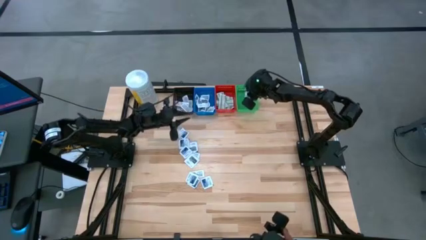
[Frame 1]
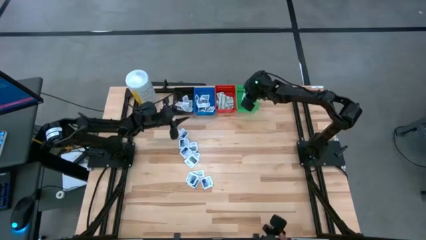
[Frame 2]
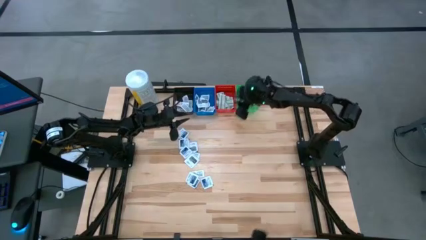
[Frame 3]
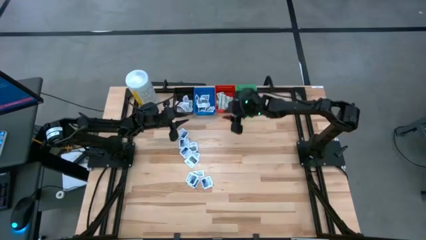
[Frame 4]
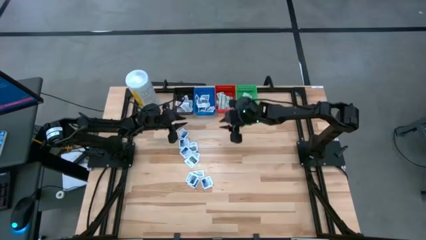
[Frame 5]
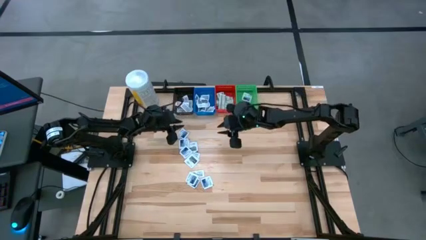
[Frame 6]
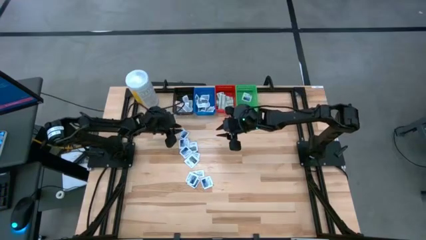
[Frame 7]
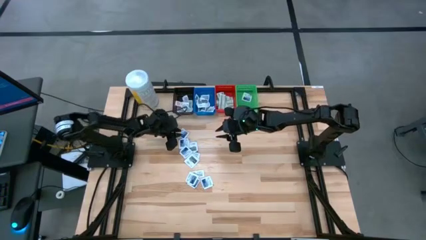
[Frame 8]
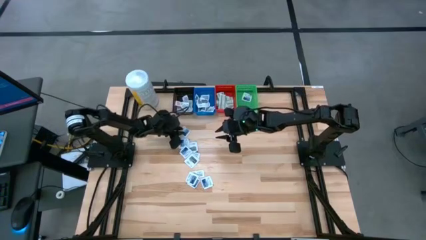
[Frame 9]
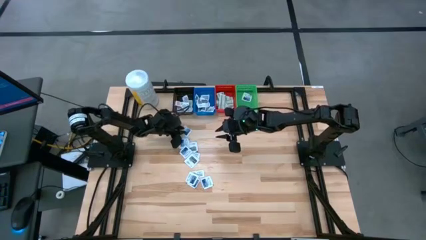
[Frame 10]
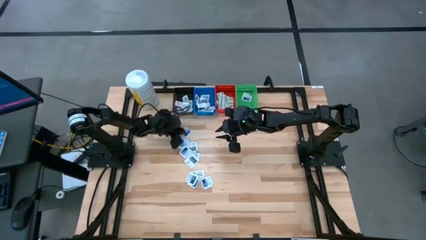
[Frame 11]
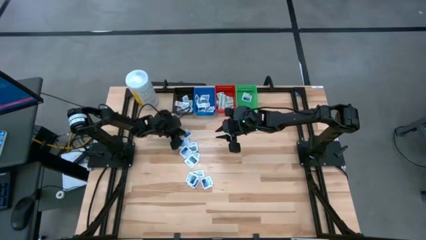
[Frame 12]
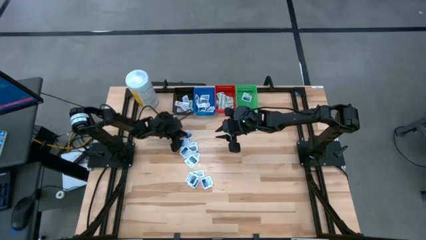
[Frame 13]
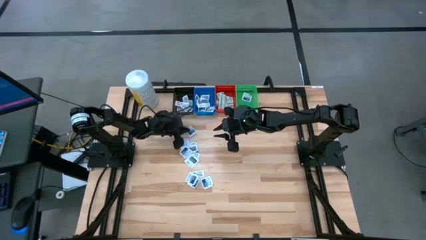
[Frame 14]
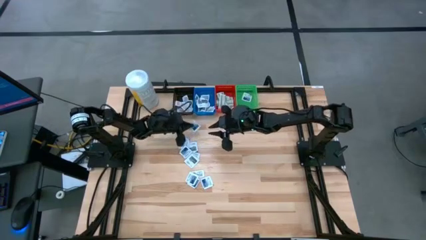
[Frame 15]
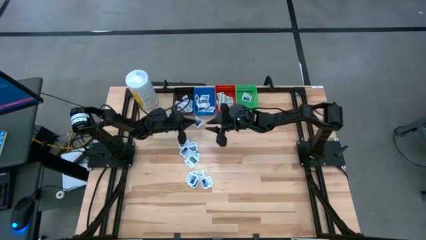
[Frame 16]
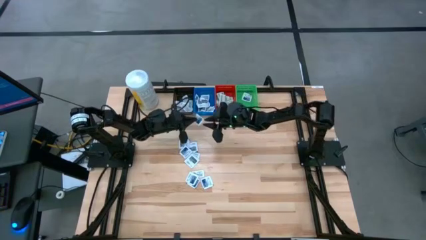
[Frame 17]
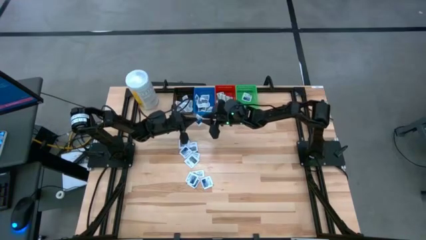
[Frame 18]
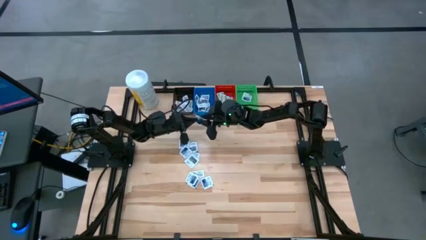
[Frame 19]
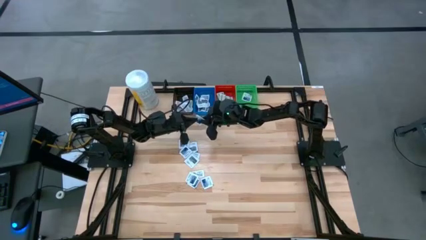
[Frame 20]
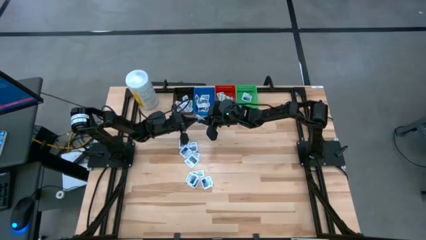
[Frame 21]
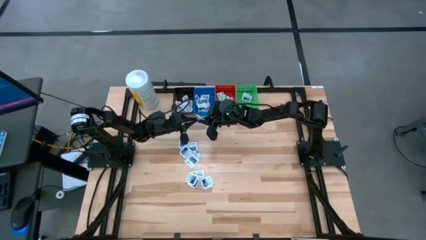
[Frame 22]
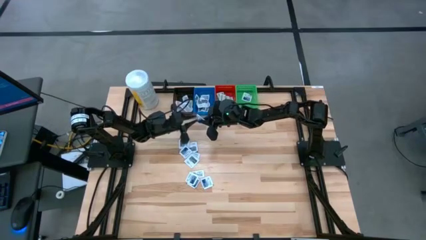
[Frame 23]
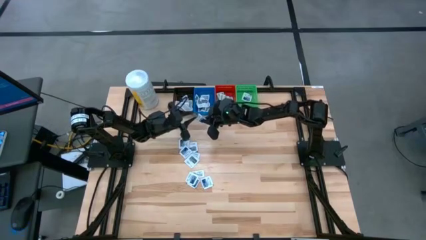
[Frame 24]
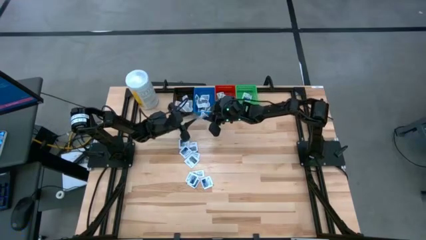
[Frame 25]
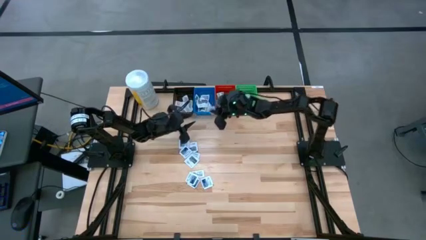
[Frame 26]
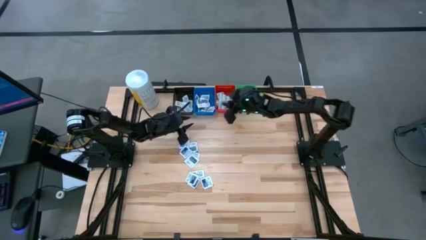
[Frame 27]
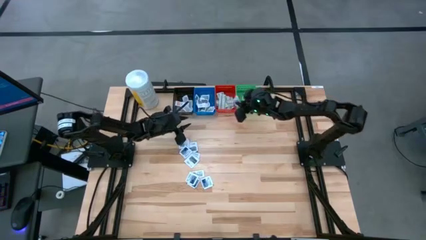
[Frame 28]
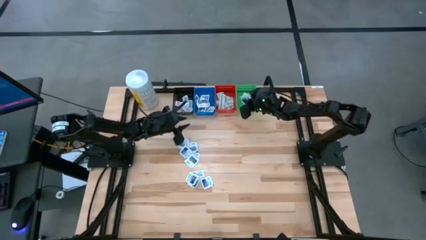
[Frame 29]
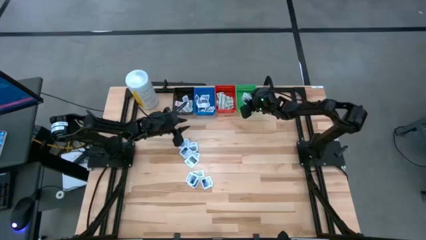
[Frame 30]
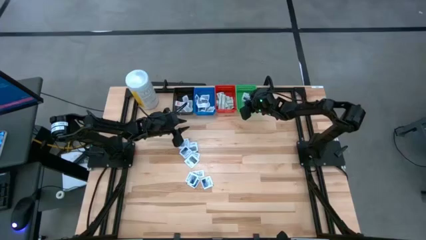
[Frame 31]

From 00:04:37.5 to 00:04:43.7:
Task: Pick & Place First Aid Supplies
Put the blue alcohol pad into the green bin

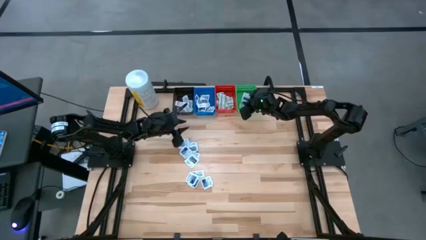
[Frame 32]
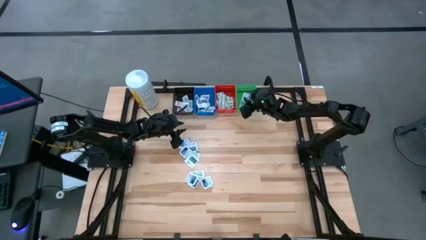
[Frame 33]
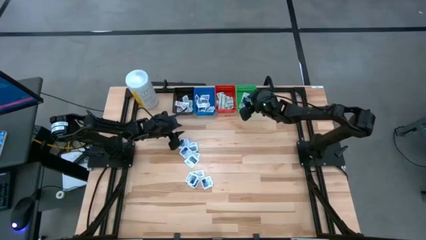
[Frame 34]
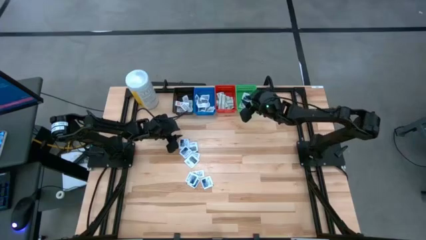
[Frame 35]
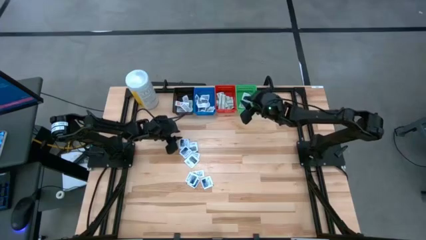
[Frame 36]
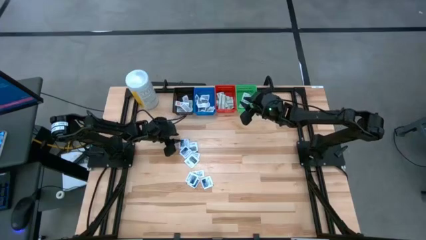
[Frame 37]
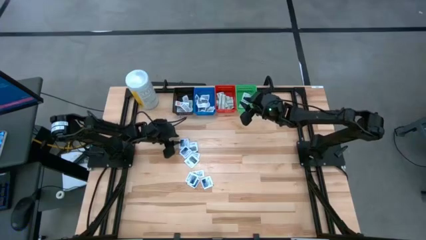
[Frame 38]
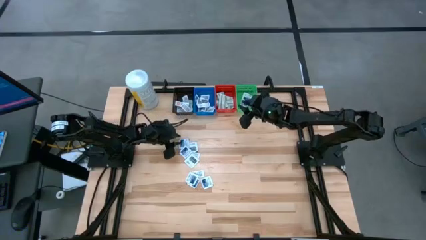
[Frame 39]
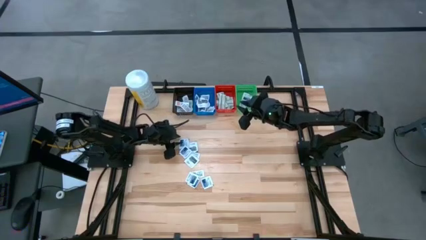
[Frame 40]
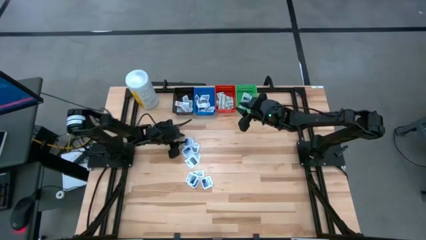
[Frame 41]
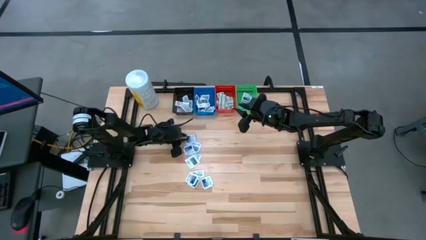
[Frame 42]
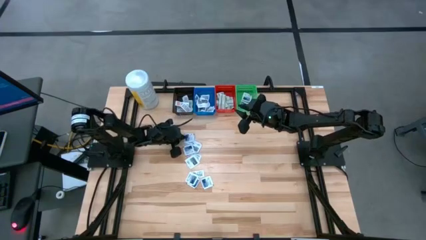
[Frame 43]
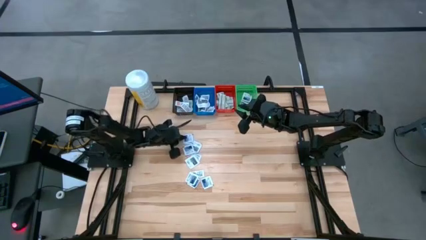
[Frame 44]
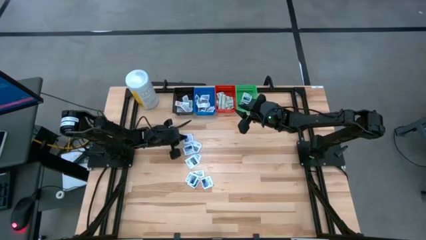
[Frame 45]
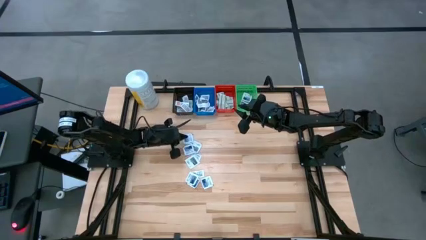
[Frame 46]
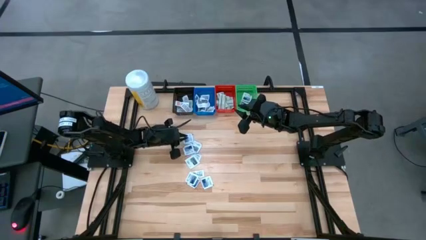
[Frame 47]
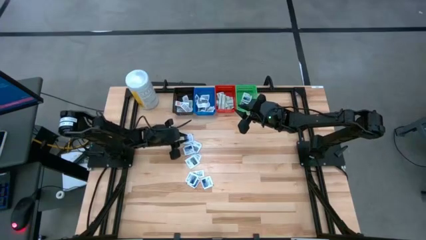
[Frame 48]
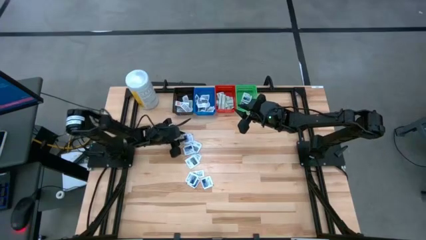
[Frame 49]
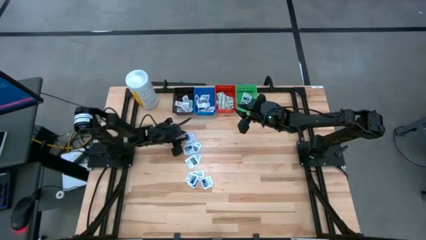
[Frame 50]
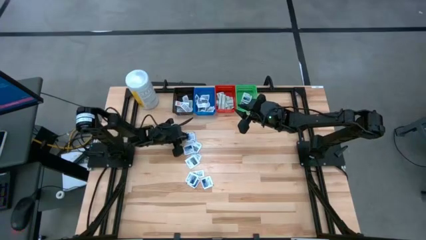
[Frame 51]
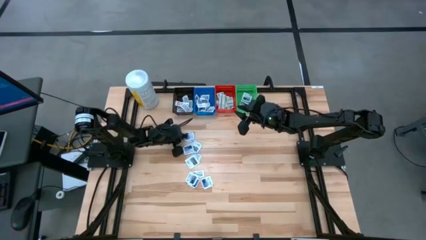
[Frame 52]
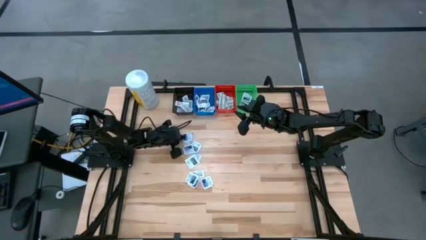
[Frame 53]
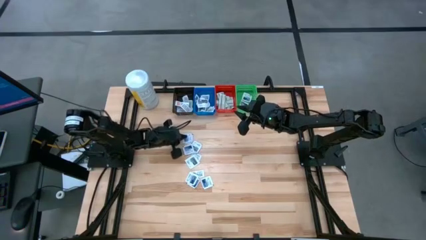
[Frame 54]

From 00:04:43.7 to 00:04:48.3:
Put the blue alcohol pad into the green bin

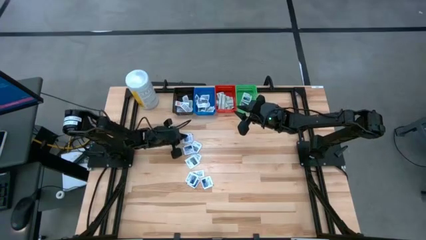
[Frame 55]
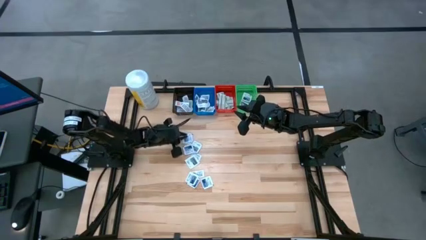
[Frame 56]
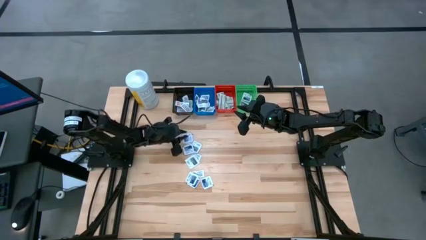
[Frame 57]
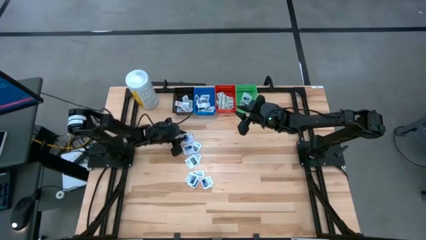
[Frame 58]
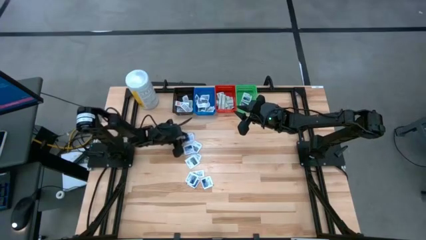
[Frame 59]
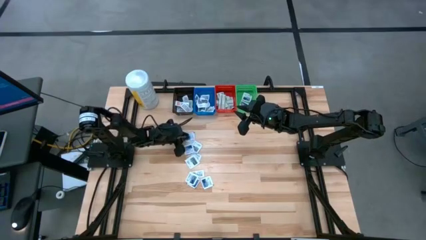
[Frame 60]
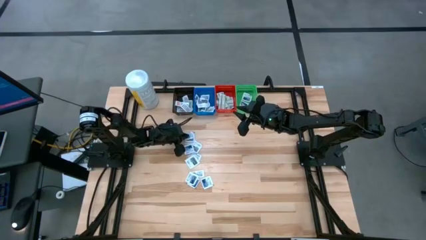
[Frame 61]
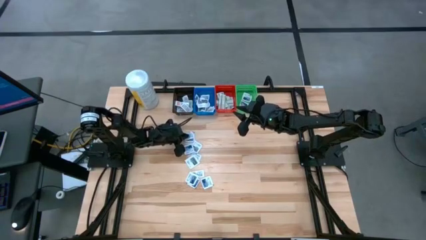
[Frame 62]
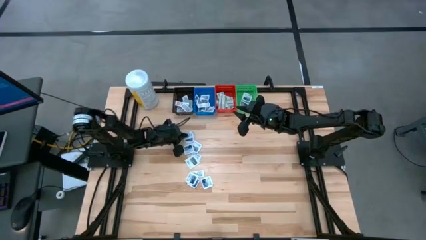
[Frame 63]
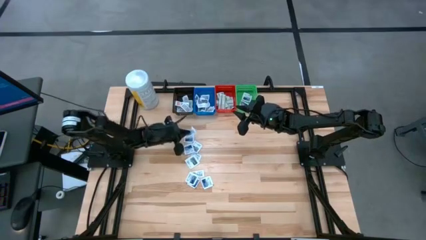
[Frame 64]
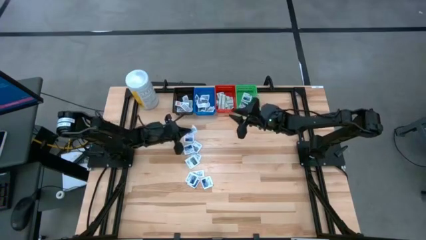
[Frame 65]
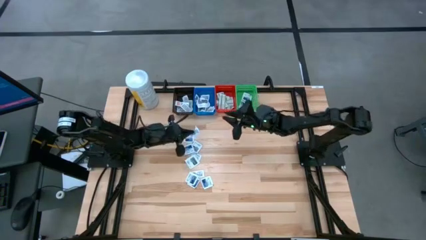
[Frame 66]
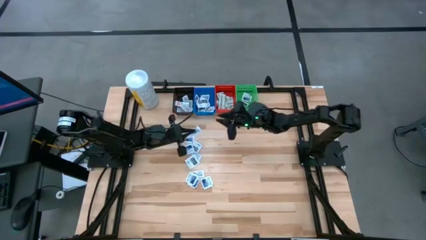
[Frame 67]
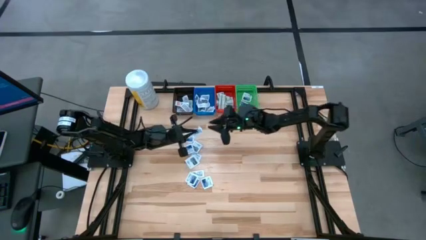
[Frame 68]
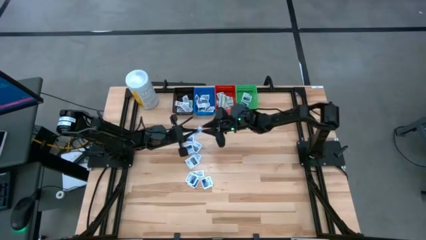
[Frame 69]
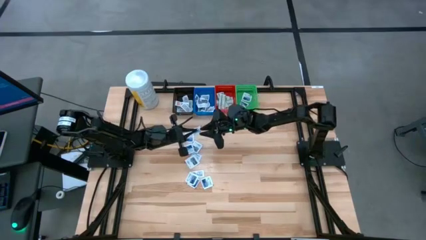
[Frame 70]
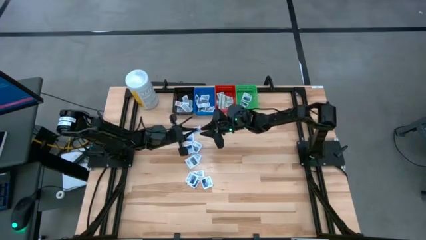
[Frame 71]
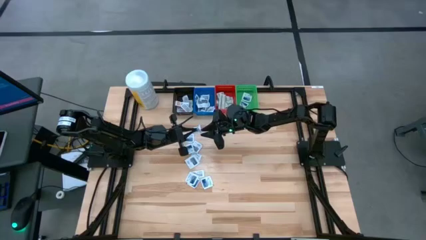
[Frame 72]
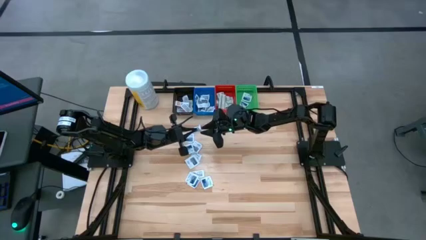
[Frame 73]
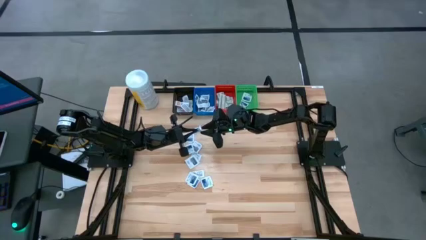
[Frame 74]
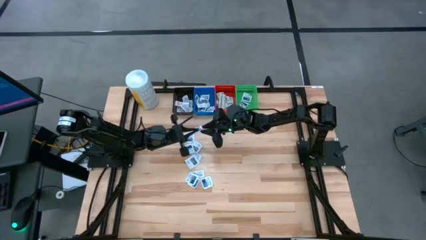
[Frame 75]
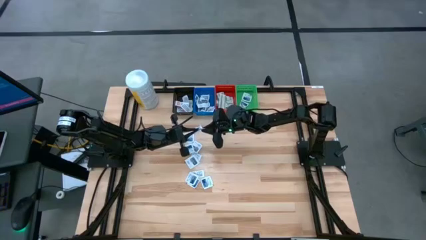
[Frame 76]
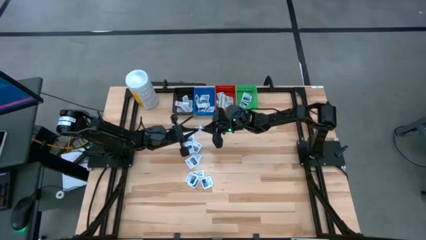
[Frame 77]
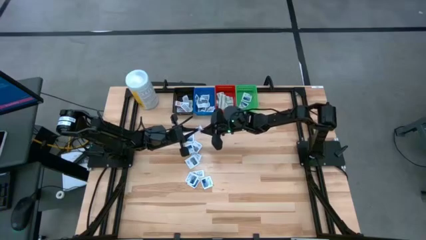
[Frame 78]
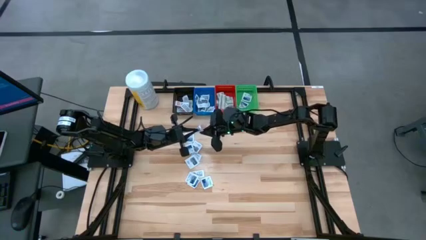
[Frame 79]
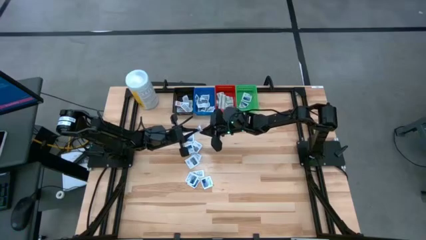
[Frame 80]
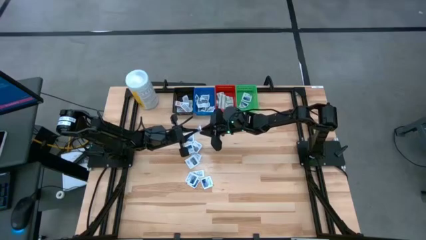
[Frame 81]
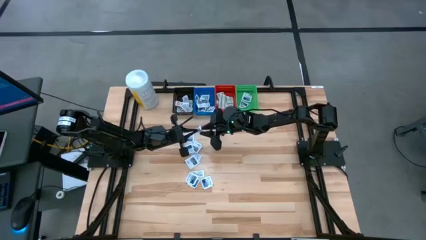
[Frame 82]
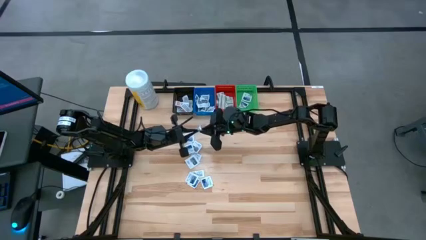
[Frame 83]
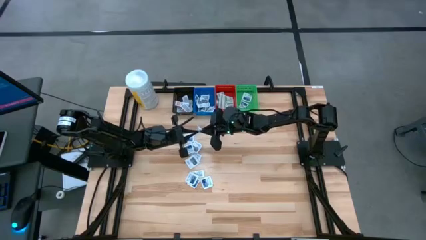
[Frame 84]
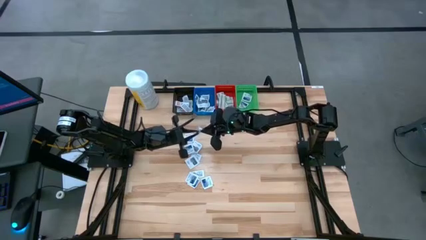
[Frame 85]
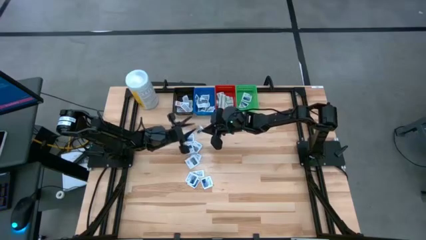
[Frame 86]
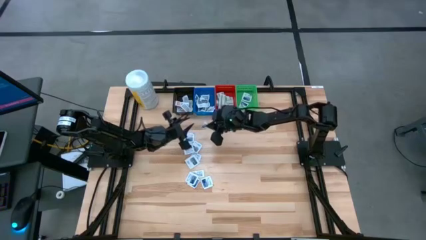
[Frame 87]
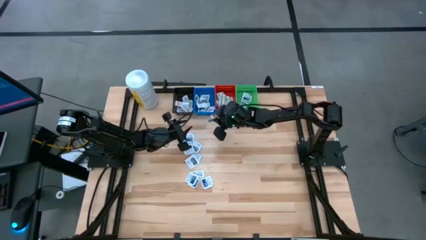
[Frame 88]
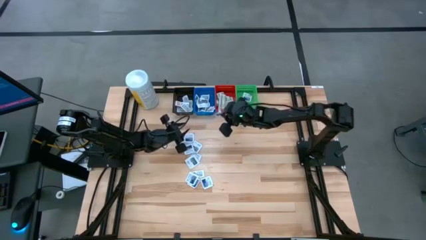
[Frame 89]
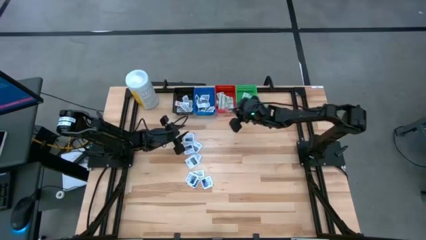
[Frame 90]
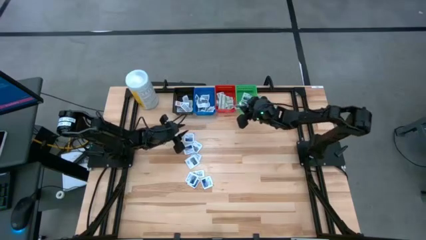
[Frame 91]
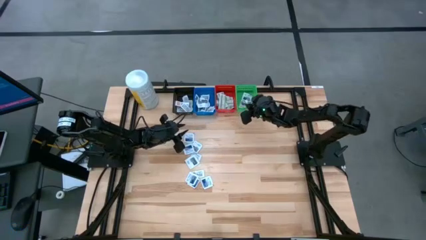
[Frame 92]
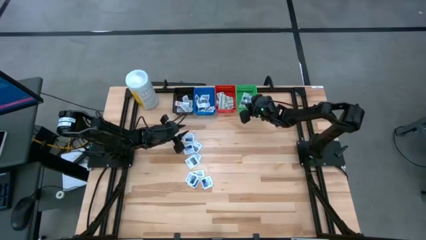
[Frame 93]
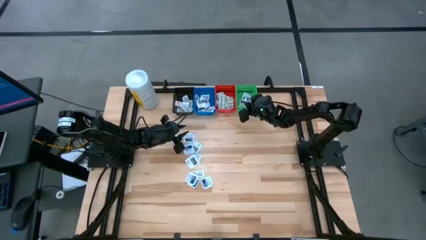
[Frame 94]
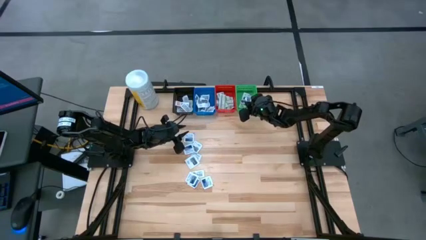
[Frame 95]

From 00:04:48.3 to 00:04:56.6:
Put the blue alcohol pad into the green bin
